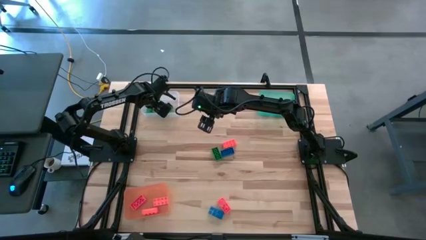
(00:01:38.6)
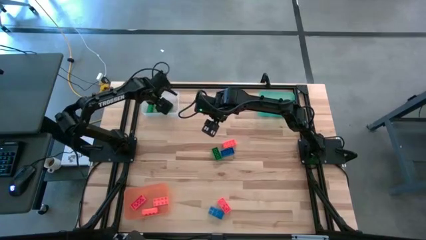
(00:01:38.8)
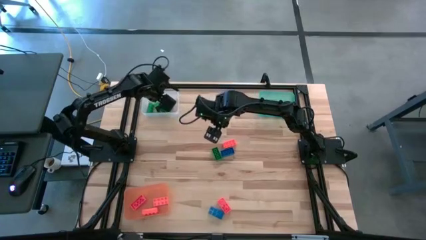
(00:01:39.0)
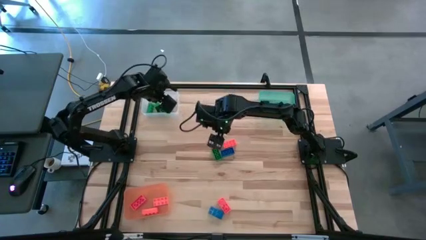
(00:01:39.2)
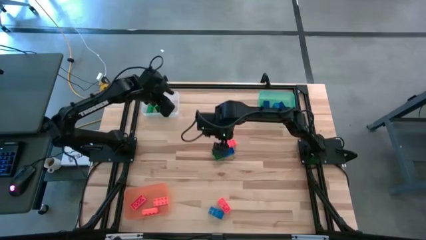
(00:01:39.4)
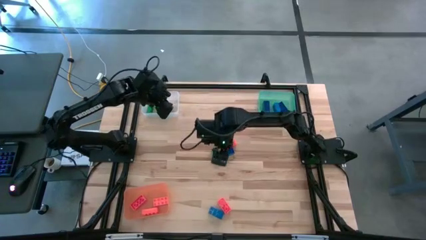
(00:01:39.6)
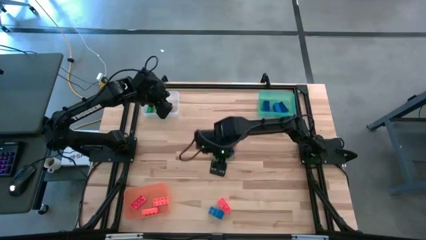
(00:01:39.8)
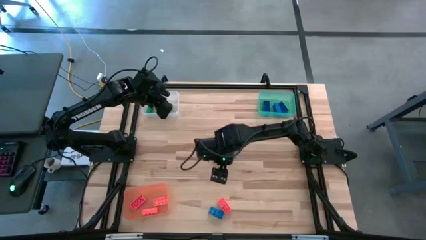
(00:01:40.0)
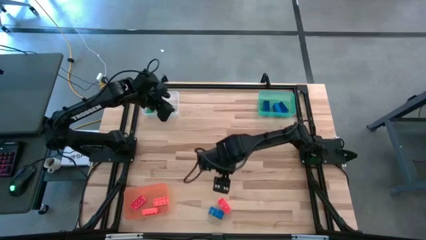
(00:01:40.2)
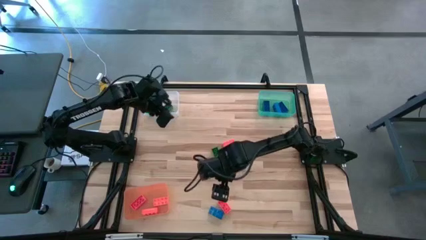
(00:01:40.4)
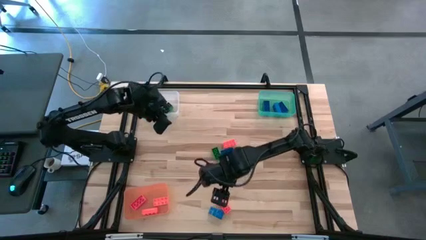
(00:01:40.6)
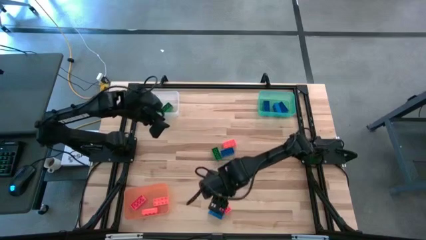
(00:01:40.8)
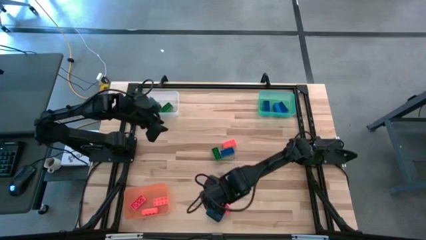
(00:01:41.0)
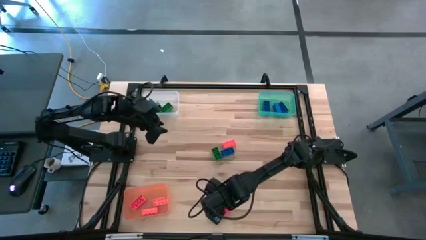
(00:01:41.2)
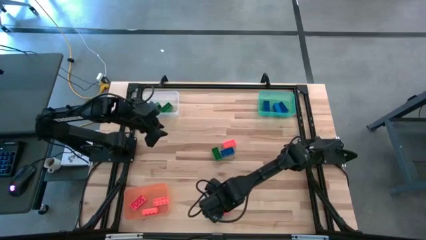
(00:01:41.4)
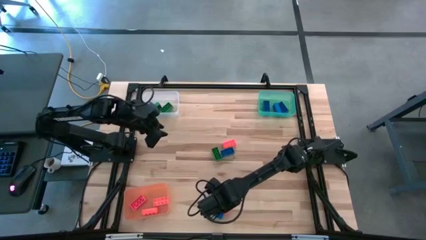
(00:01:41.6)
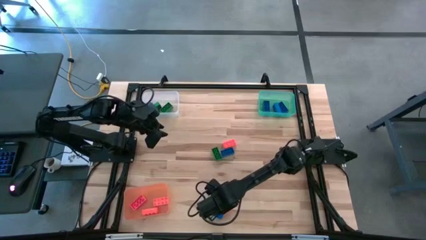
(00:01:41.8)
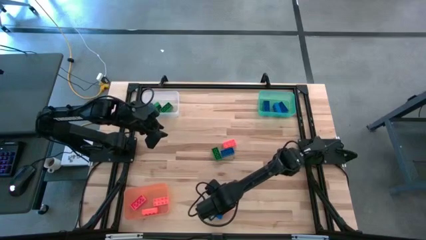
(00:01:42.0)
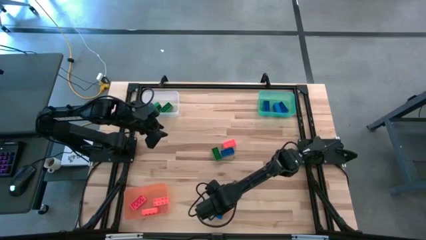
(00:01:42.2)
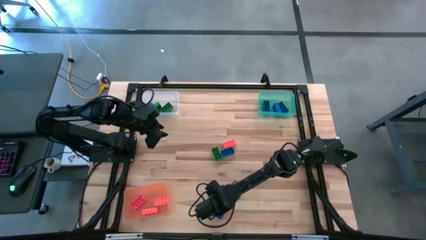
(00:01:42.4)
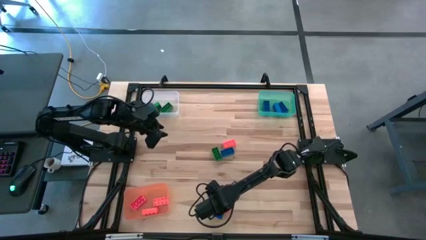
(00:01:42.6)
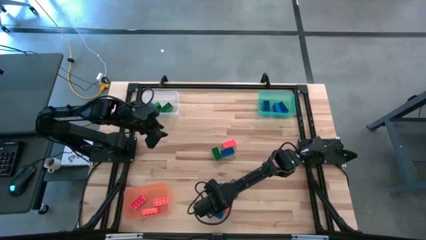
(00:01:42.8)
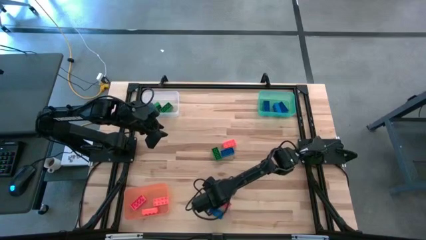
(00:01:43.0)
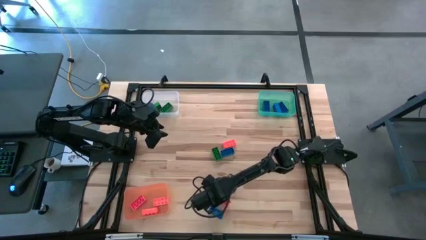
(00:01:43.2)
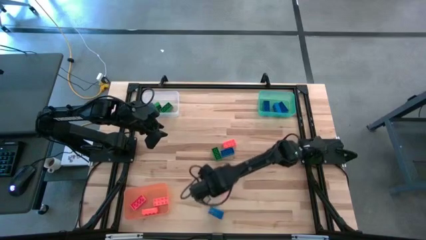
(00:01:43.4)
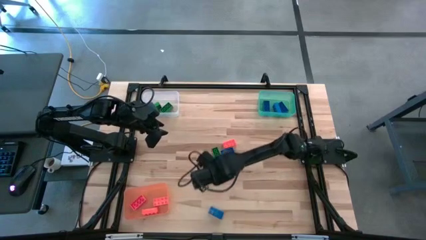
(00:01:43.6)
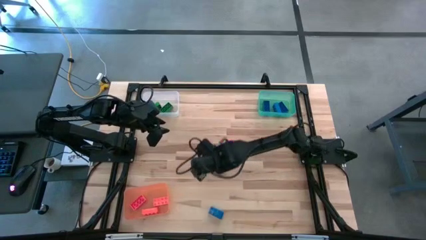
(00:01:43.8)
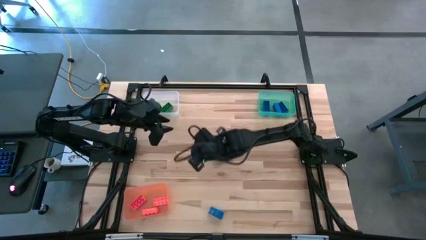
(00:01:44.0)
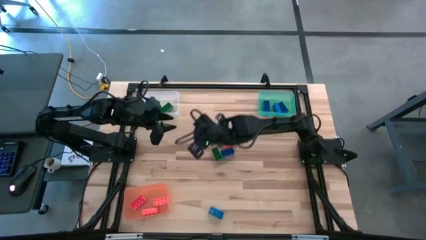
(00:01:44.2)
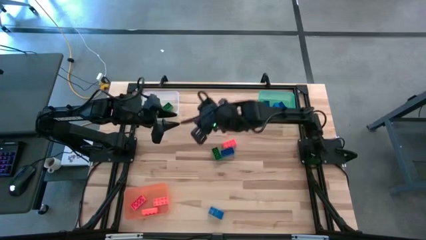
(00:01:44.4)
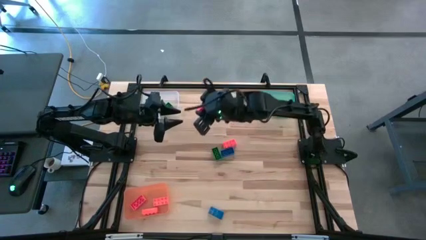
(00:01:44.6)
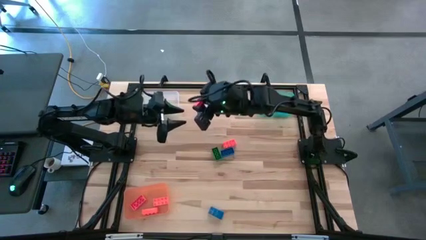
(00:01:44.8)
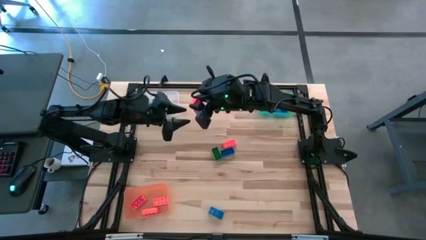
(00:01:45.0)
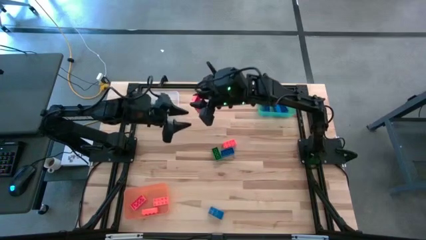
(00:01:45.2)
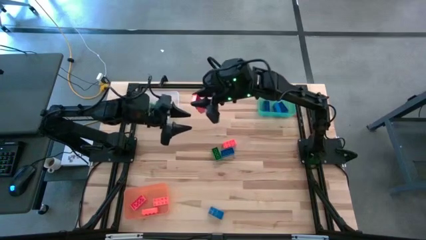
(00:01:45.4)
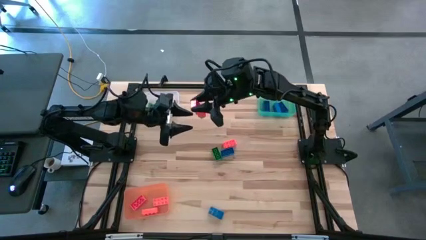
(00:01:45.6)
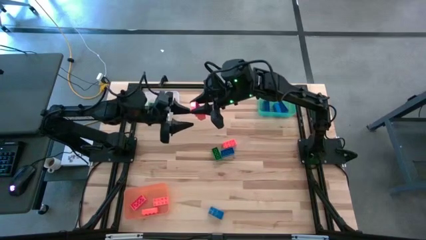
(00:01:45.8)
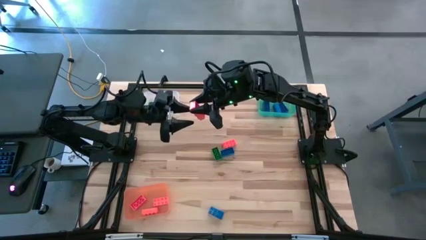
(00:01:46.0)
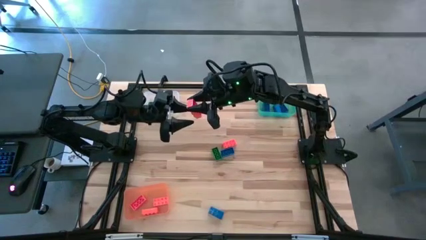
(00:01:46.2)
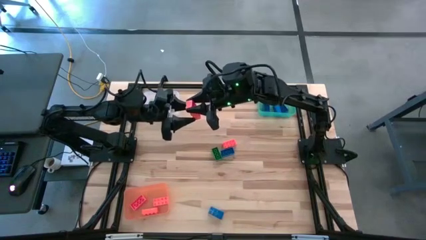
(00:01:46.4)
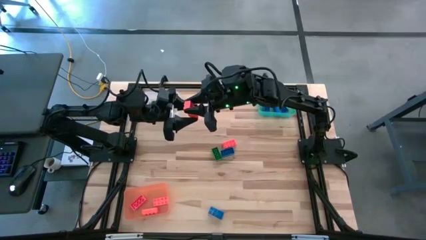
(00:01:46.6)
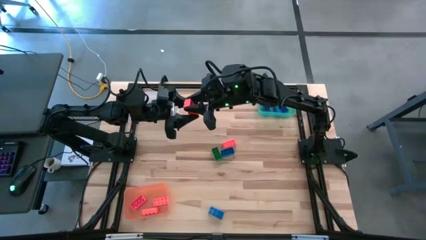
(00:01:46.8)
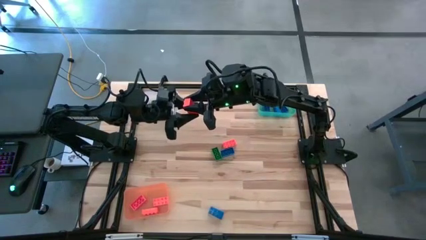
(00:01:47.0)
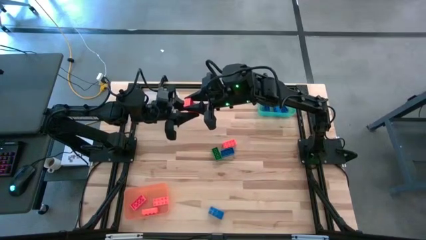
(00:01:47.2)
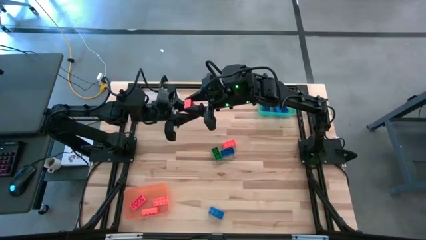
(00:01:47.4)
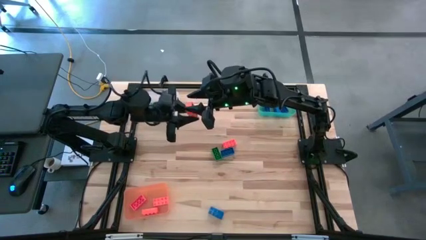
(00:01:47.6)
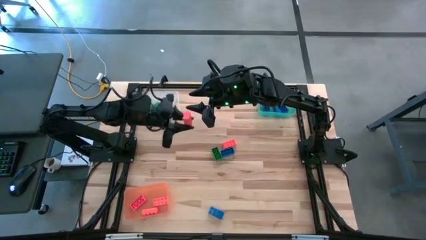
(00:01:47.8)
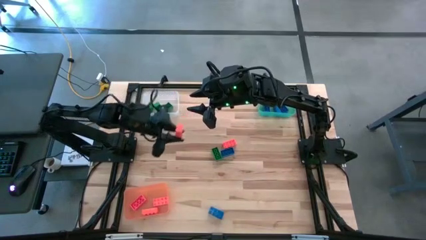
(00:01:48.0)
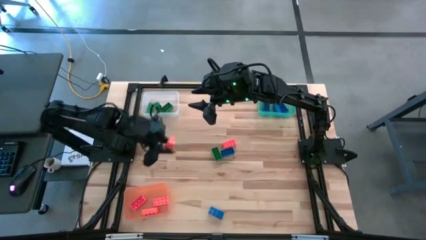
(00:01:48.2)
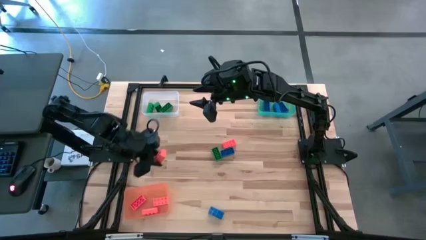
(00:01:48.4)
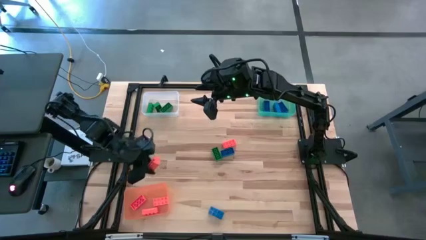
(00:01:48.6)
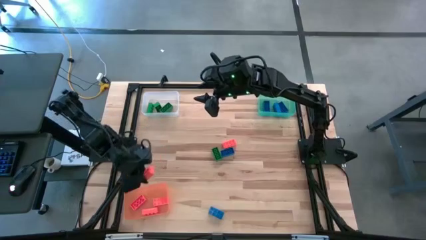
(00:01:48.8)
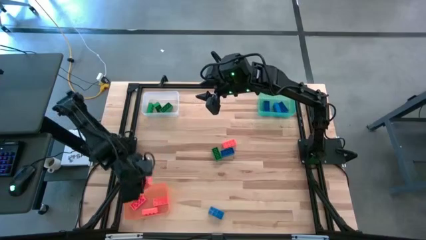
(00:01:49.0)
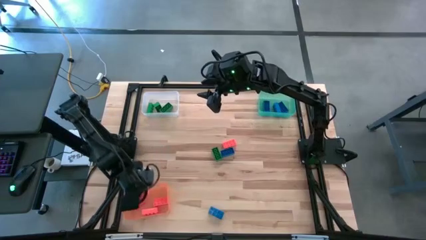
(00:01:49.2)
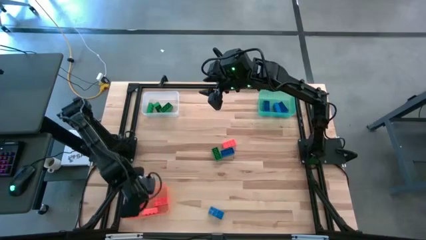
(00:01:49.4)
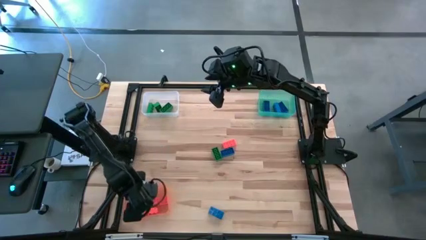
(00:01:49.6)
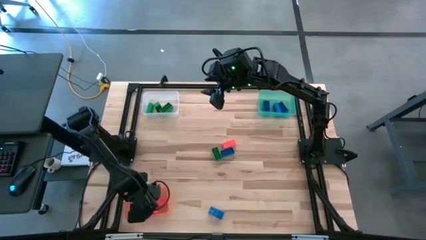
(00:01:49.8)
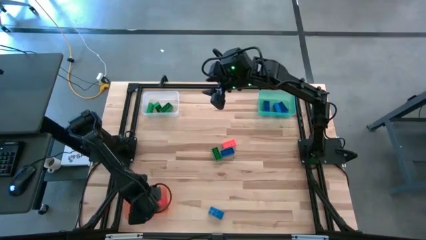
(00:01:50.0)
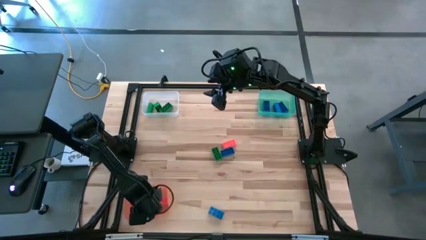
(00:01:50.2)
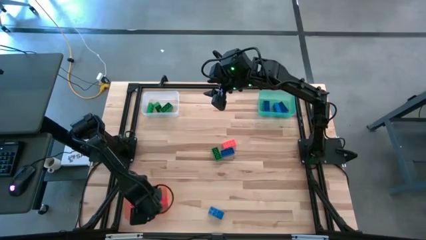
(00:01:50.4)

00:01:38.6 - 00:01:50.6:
Task: Sort & place blocks by color
Put the orange game piece into the orange bin

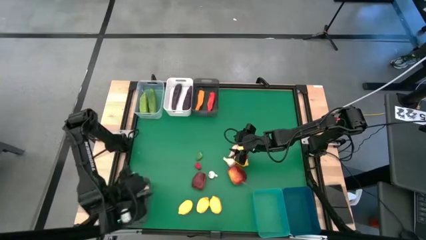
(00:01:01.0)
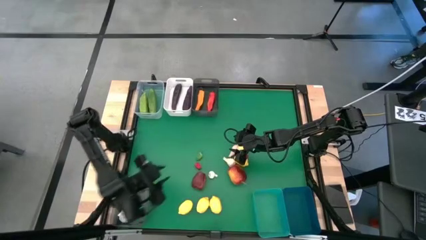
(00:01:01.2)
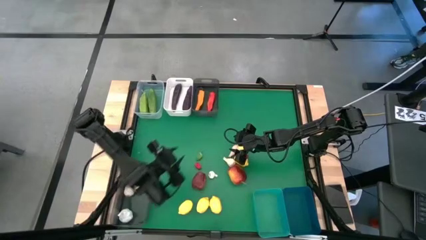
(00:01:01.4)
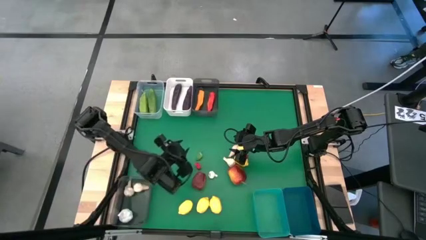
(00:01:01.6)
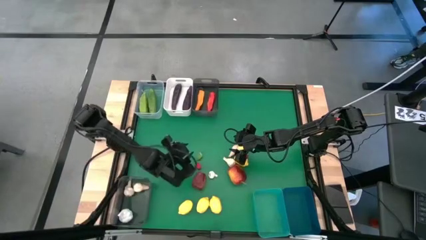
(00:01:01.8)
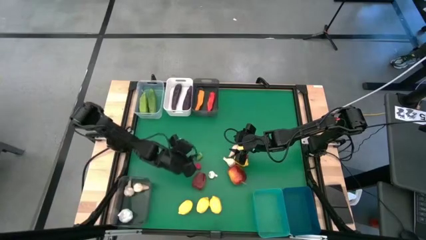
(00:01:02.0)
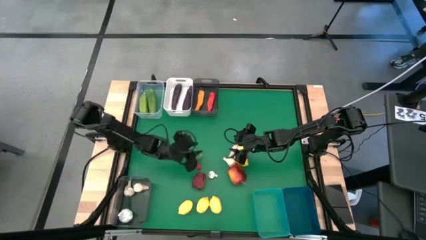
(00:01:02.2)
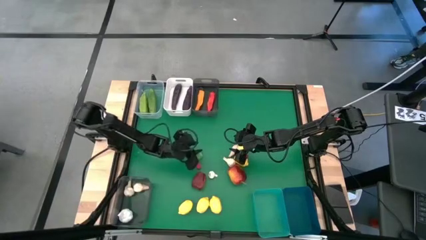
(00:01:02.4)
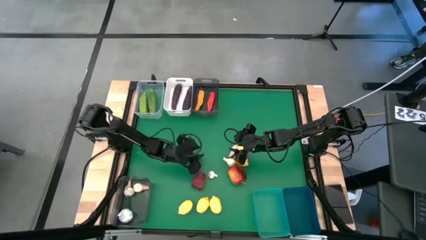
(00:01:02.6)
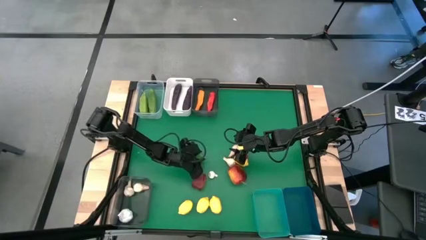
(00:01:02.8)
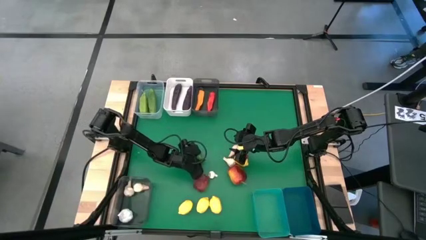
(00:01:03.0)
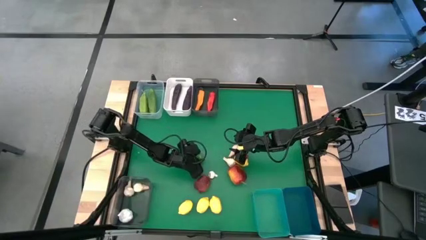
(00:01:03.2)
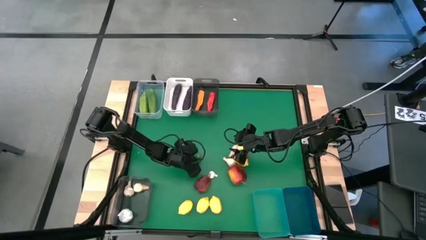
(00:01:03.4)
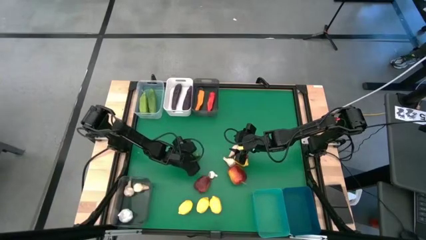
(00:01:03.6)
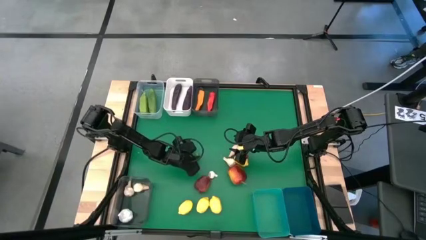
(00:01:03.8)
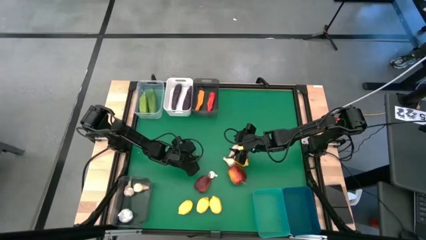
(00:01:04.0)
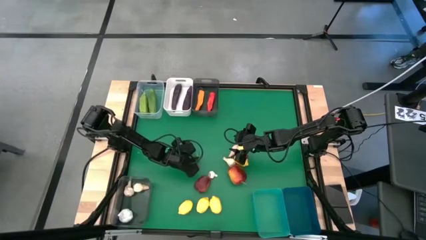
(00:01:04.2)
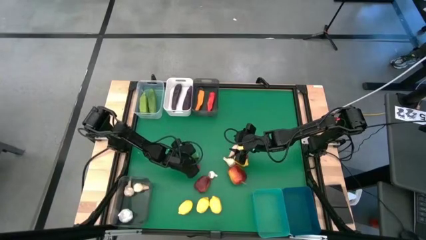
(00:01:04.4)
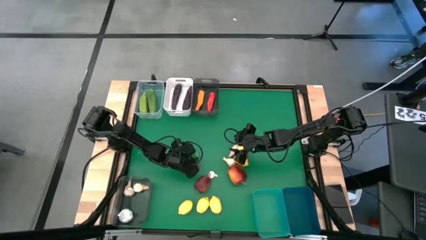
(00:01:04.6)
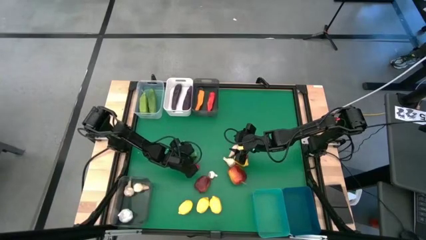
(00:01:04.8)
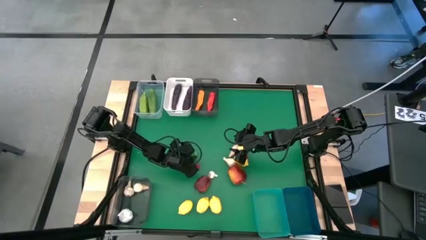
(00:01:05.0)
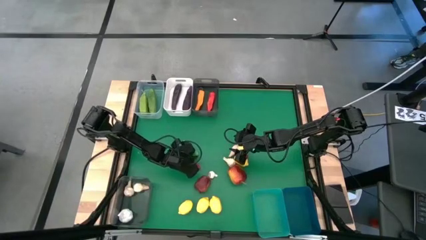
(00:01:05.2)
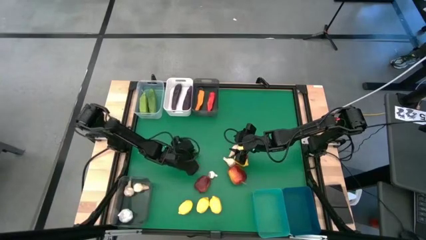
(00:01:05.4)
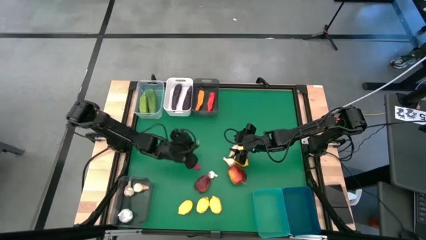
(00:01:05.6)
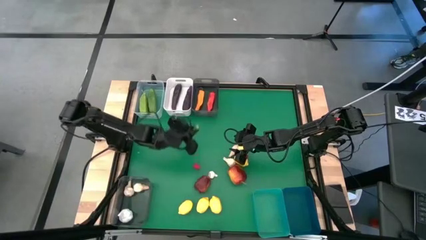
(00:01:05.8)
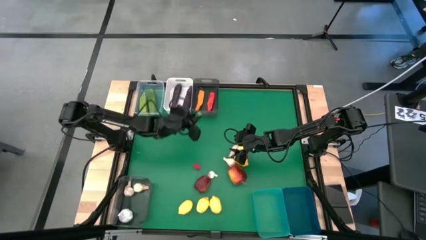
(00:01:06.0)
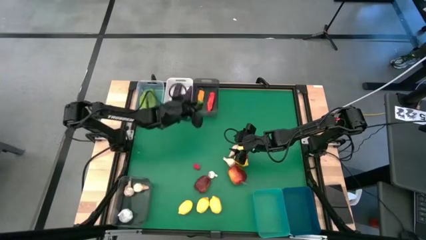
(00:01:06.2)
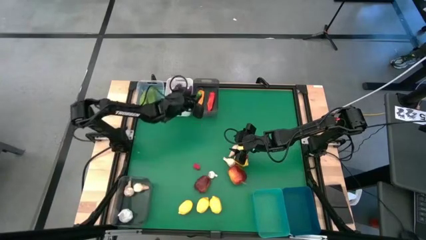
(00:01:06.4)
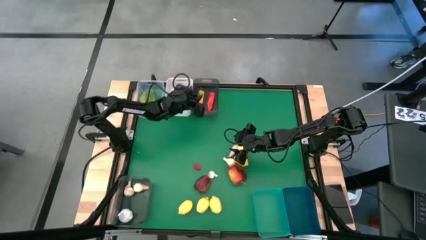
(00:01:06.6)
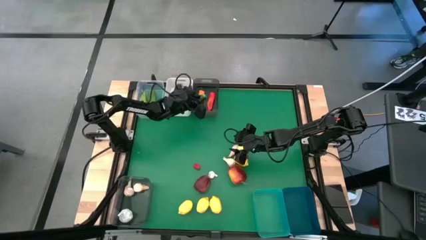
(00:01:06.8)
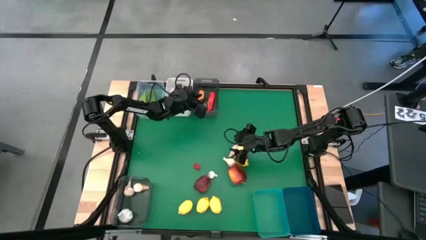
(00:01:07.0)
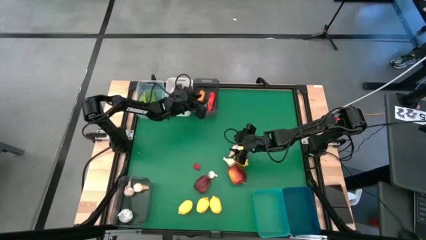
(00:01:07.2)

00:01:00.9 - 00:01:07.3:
Task: Sort produce into baskets
Put the green chili pepper into the top black bin
